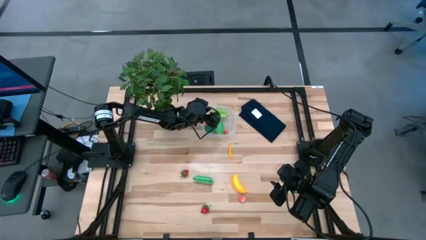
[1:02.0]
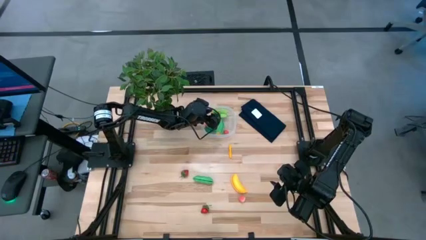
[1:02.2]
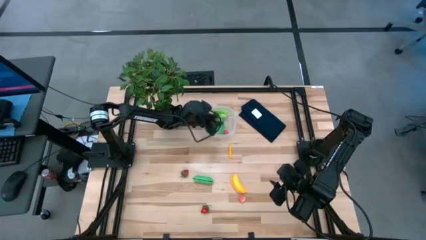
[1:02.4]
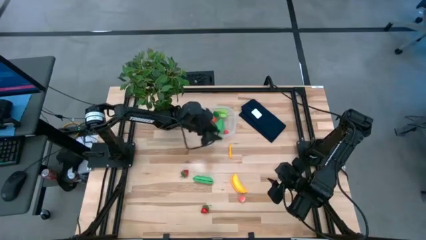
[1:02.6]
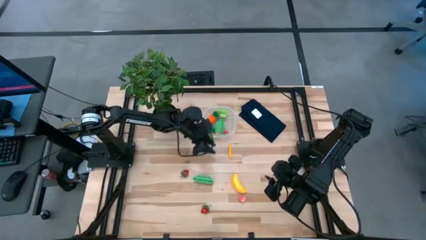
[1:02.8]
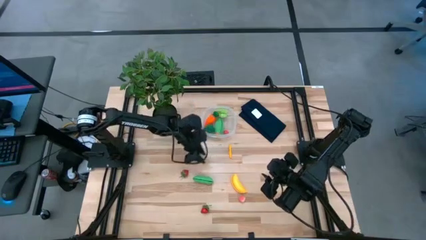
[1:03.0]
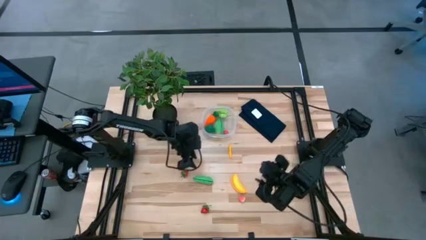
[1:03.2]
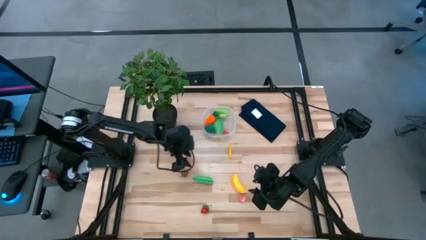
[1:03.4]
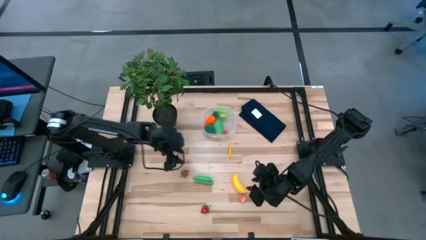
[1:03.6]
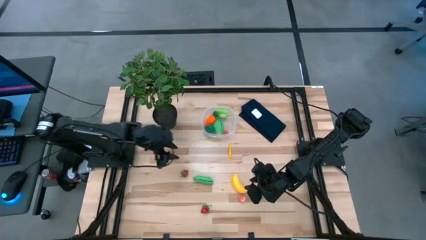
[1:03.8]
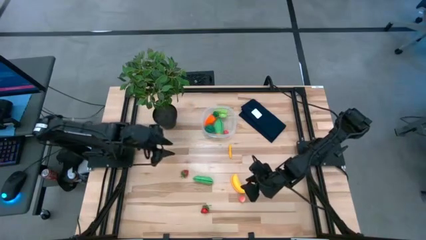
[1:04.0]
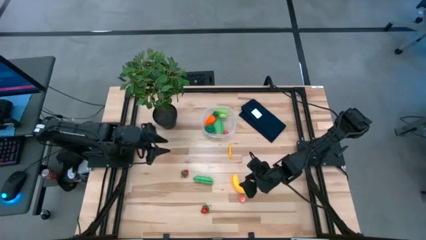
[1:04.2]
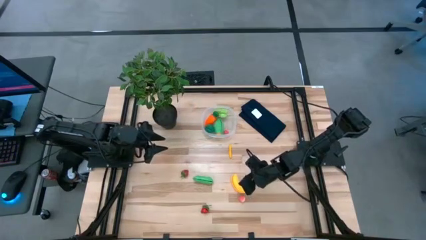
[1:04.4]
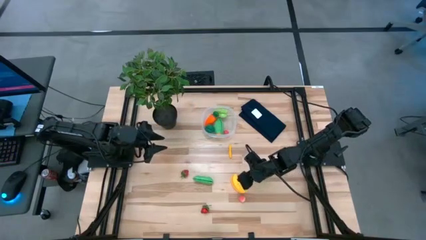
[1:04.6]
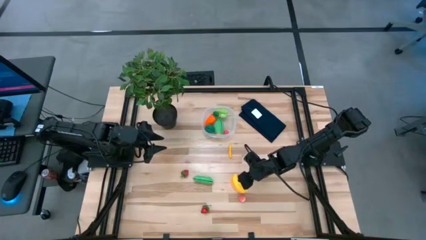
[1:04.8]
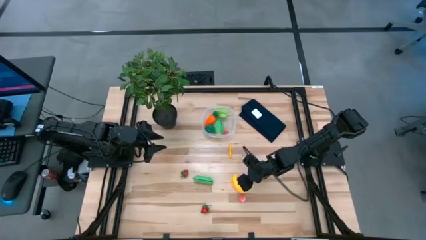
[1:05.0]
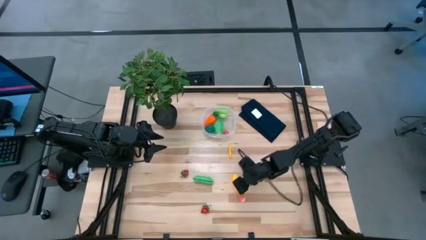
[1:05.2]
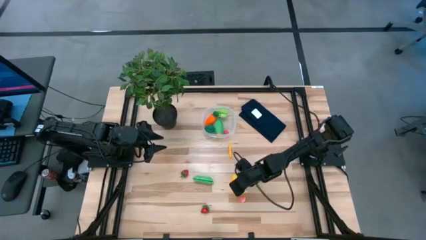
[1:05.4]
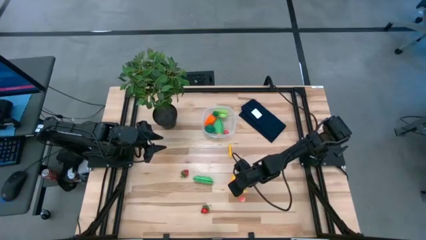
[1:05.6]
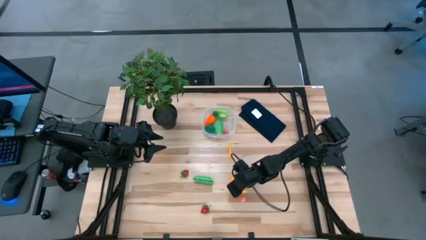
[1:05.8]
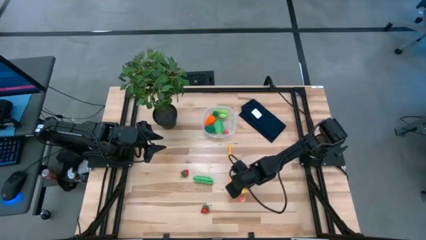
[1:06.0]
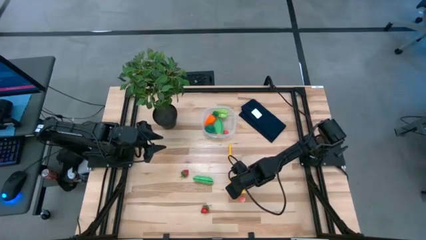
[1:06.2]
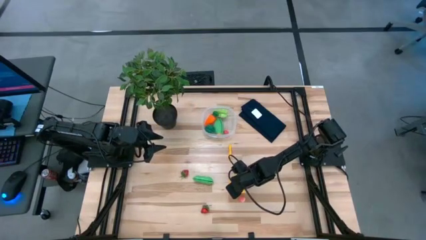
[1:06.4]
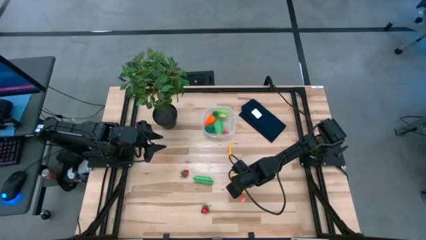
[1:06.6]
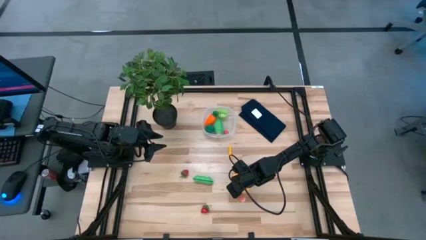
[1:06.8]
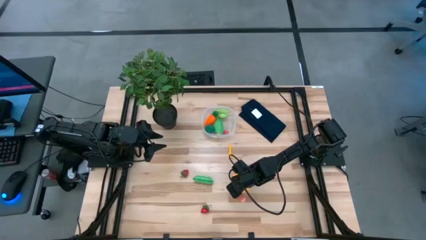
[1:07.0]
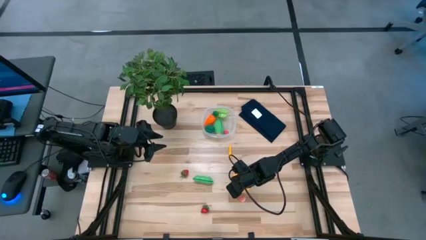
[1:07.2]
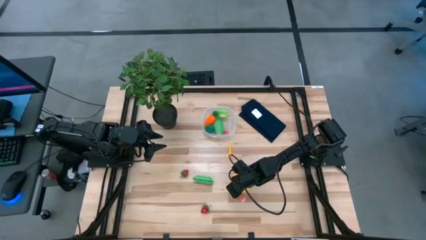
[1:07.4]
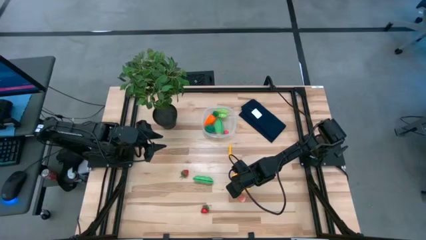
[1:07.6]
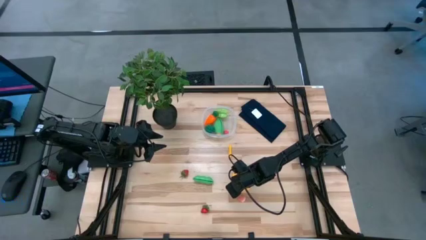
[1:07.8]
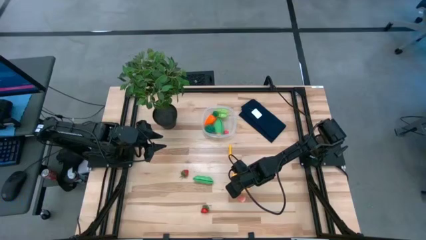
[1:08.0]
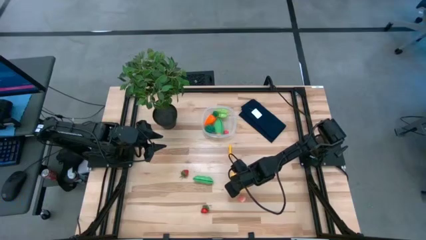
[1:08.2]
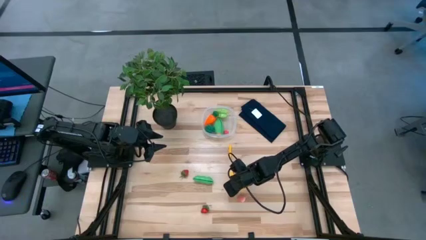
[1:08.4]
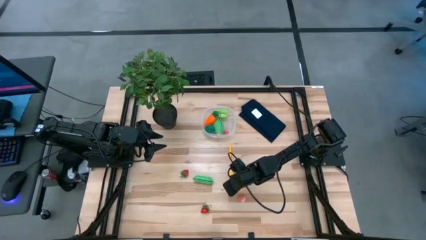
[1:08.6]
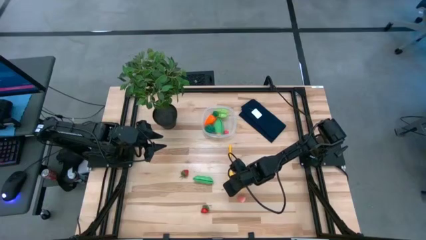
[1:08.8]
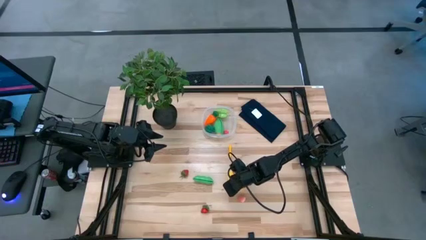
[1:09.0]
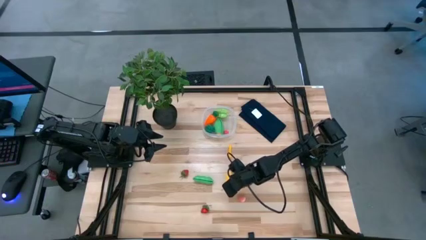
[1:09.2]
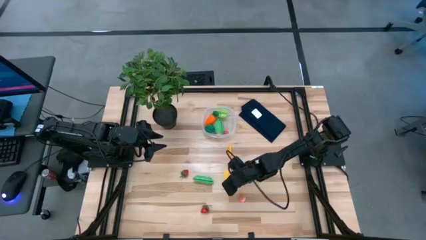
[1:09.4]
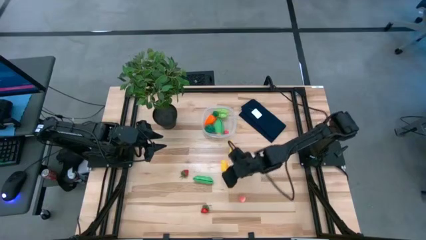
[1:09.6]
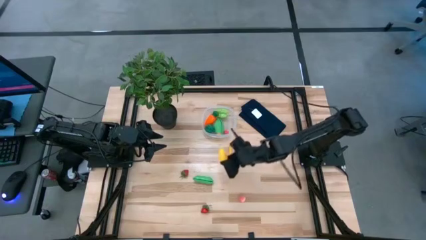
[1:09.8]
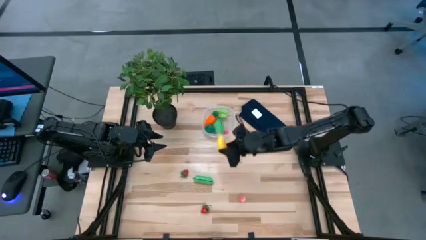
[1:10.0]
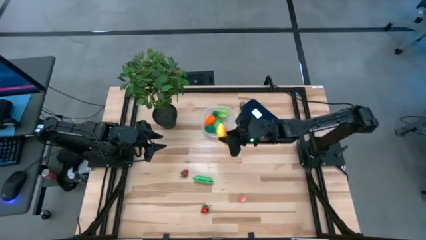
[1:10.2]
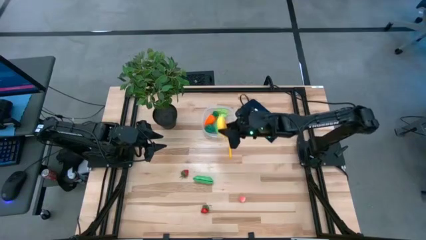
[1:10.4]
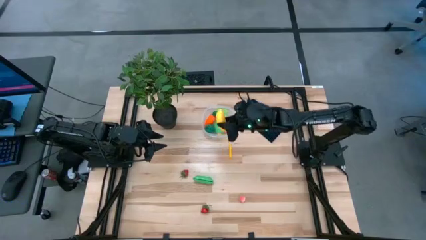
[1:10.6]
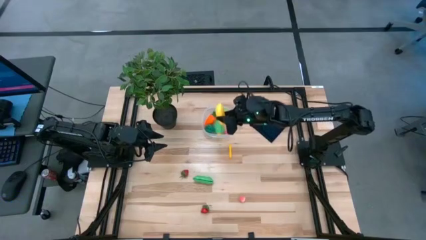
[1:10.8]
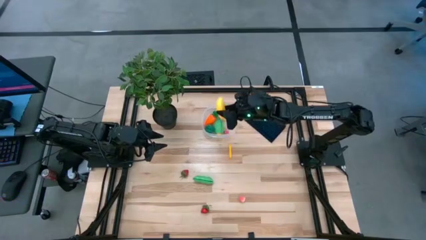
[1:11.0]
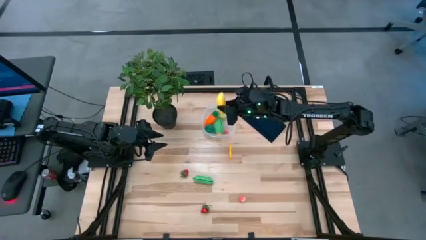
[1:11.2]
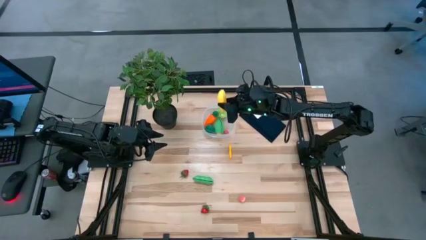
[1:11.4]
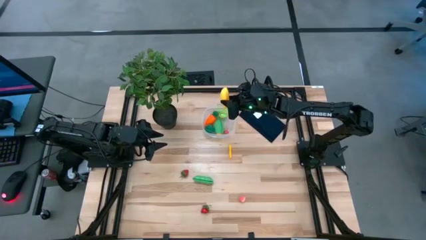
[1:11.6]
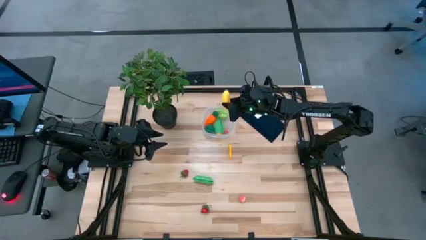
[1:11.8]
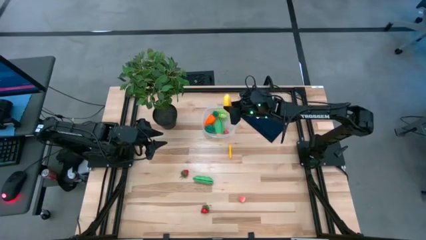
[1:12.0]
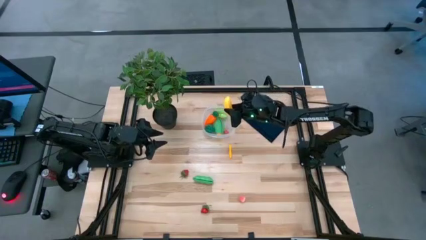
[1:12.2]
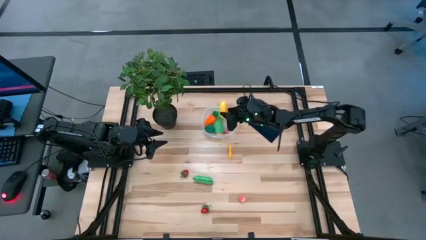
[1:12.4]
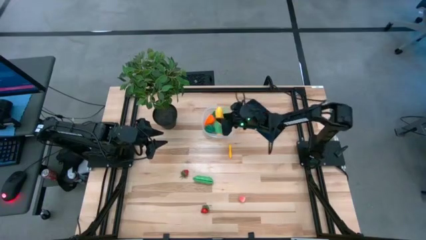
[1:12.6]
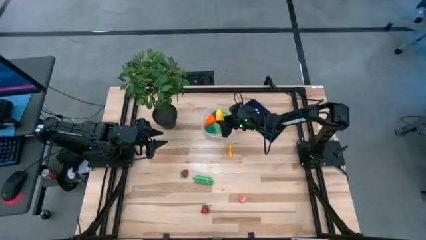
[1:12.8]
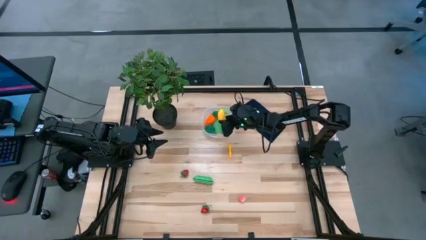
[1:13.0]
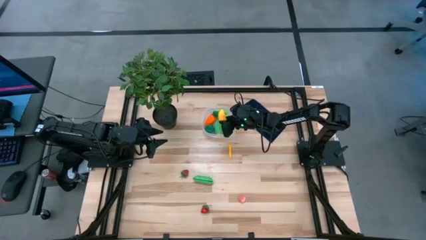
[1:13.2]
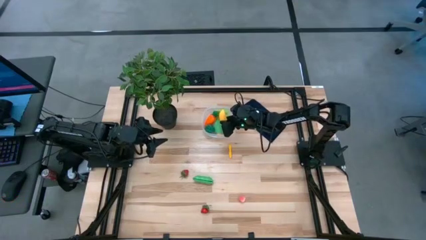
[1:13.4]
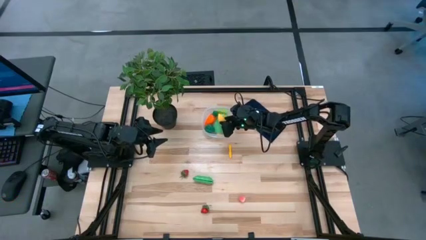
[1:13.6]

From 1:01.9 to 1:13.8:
Task: Pick and placing Produce into tupperware
Put the yellow banana into the transparent bin

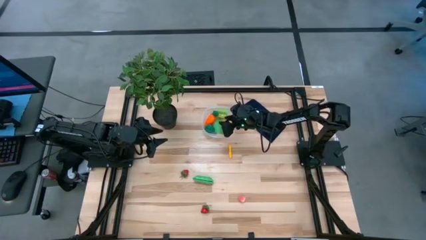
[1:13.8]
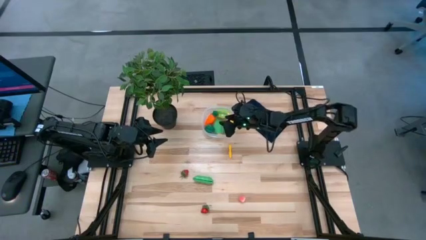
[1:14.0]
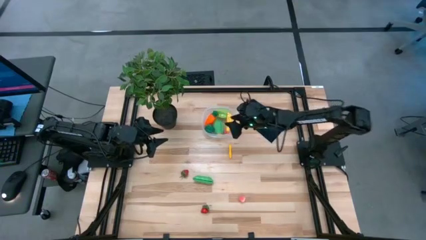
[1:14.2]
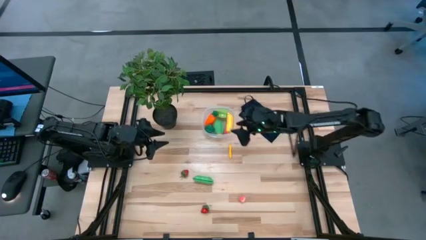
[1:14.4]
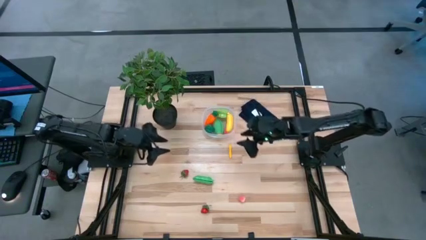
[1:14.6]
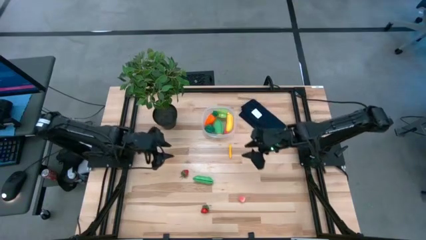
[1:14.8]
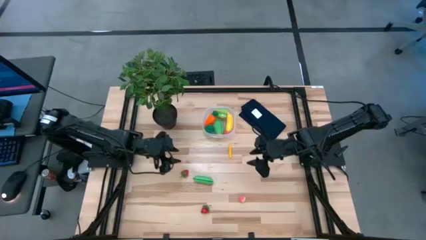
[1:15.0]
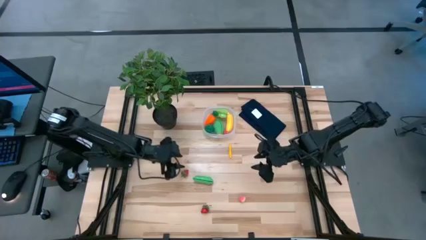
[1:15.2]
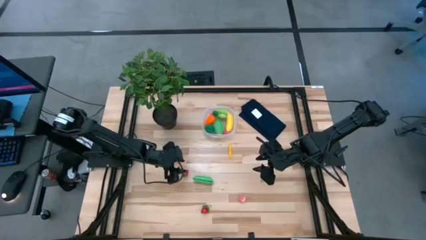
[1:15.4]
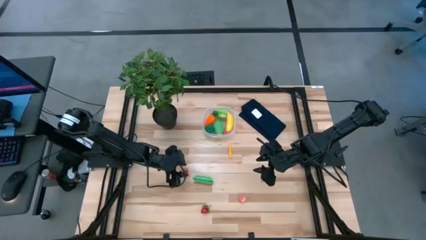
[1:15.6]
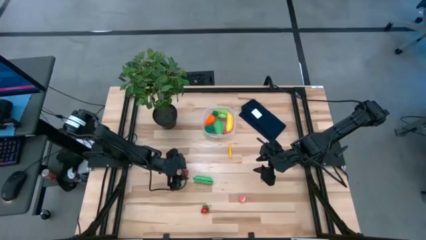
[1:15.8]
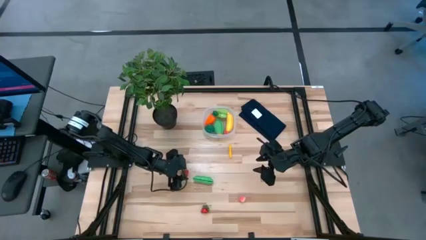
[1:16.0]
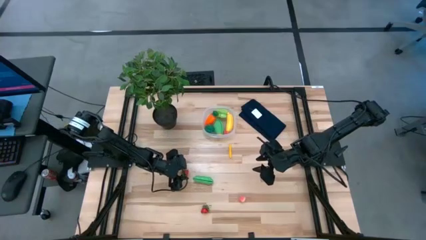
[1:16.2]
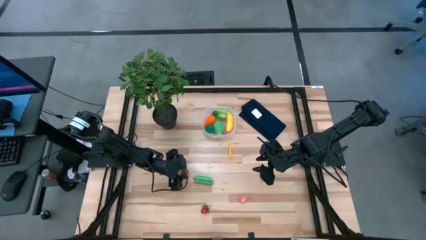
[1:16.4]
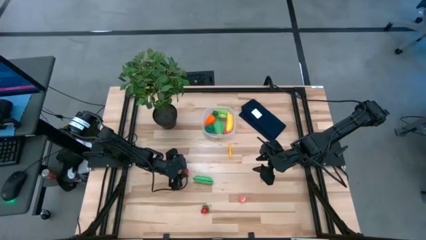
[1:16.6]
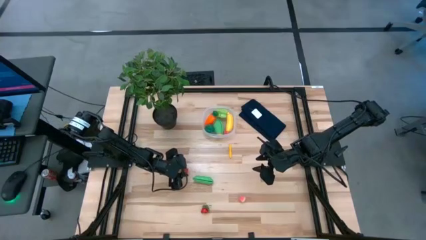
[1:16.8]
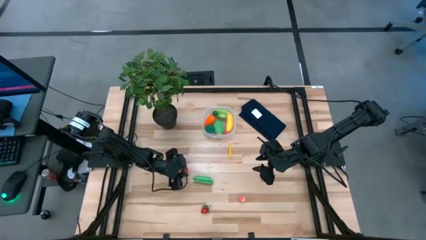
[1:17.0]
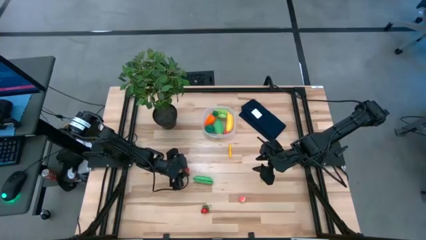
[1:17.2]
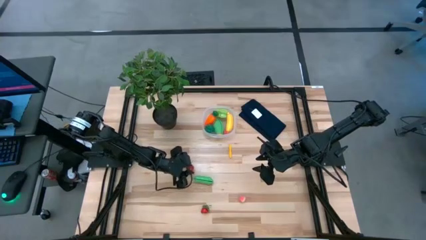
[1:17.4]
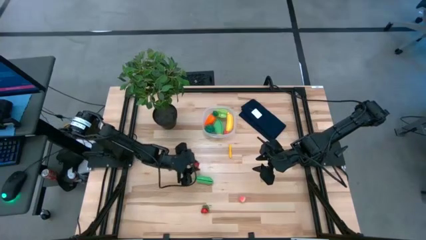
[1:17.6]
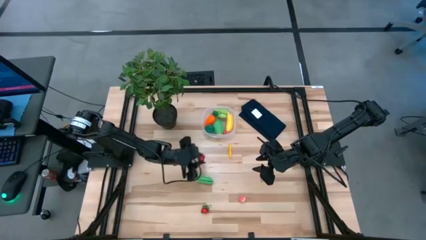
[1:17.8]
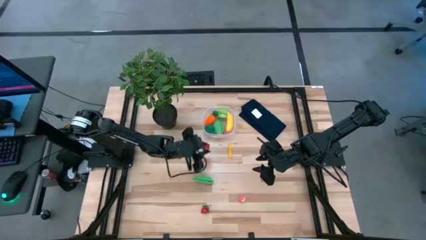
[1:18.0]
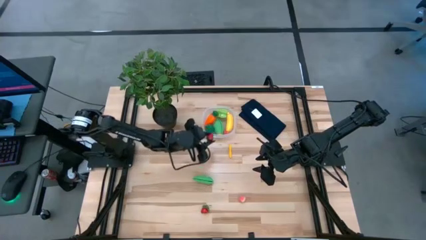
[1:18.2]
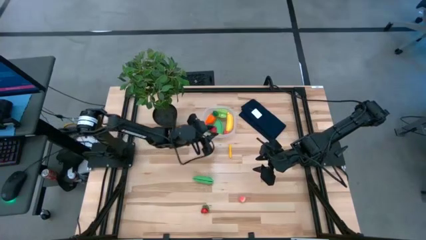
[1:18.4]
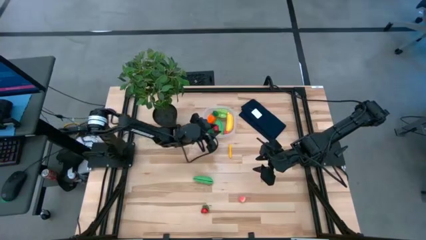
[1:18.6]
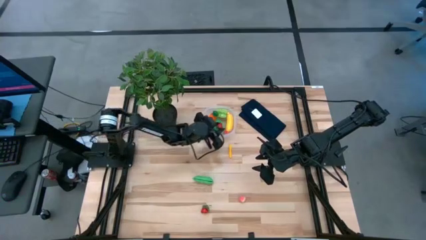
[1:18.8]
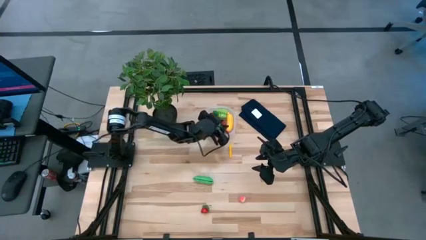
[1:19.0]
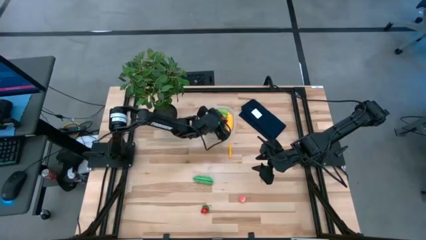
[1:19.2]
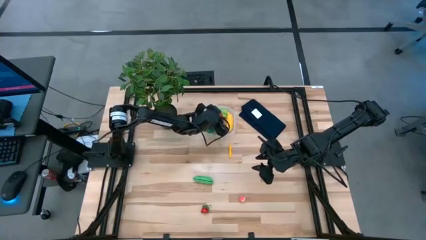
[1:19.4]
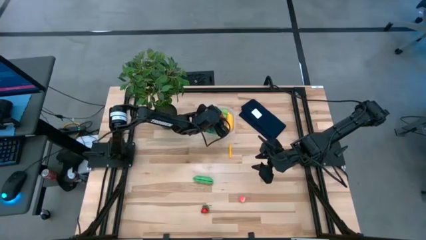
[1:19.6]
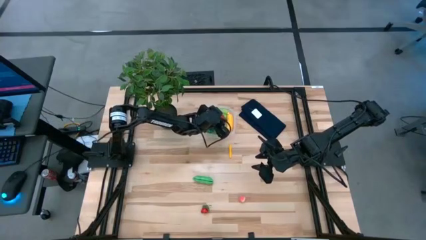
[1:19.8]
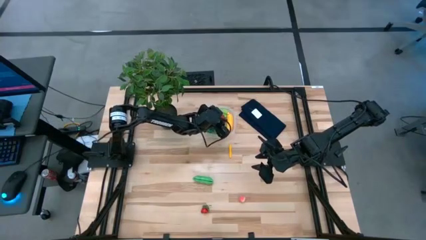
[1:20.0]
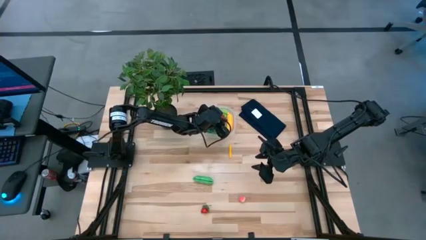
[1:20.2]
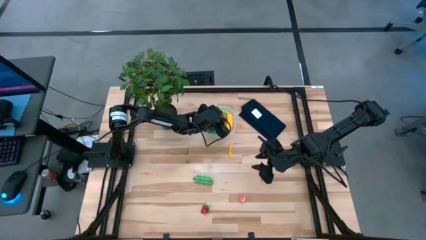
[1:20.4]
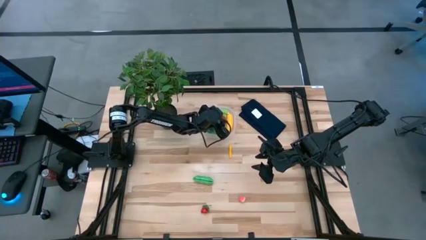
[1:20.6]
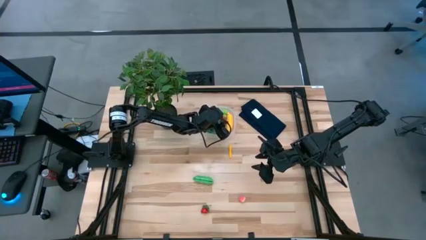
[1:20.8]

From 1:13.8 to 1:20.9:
Put the top red strawberry into the transparent bin
